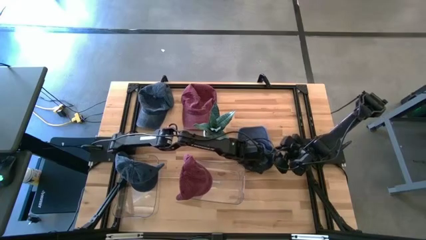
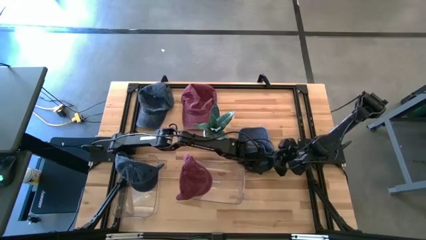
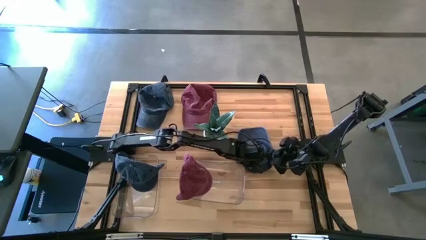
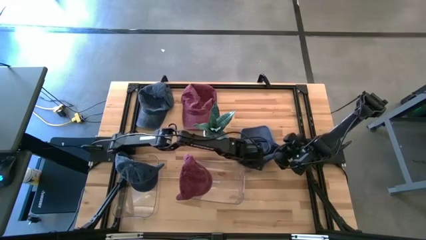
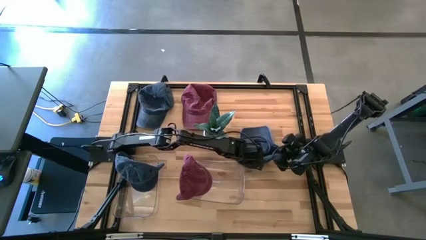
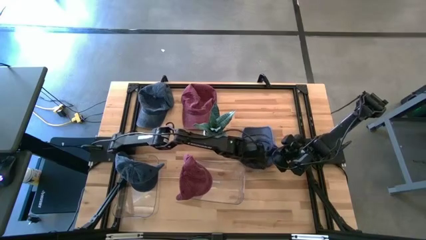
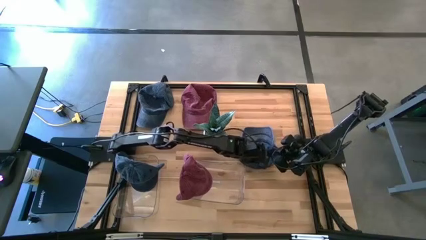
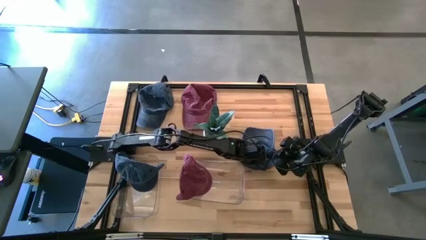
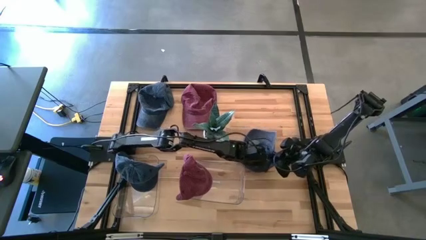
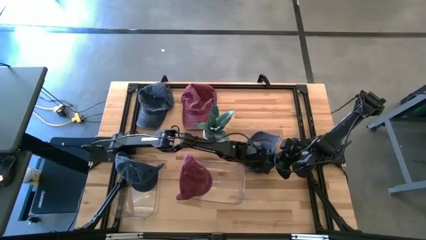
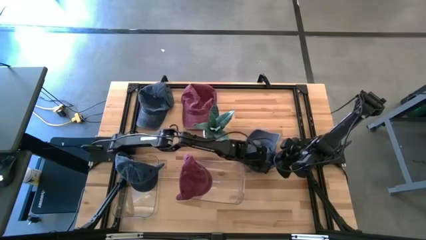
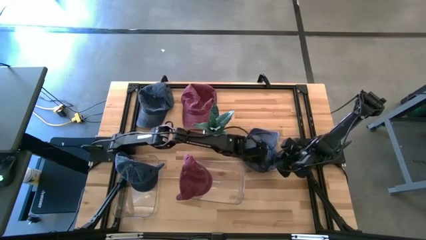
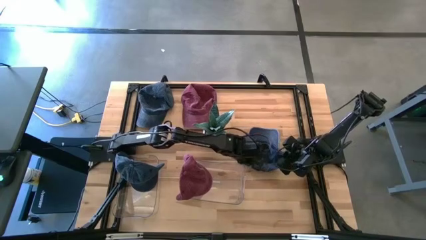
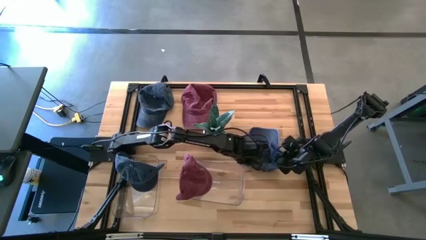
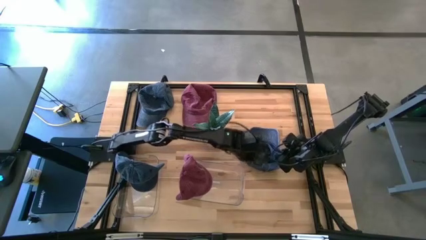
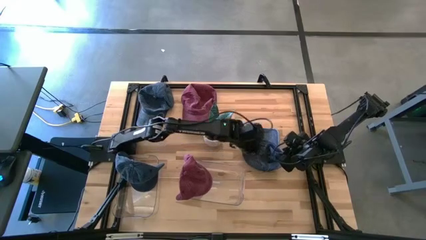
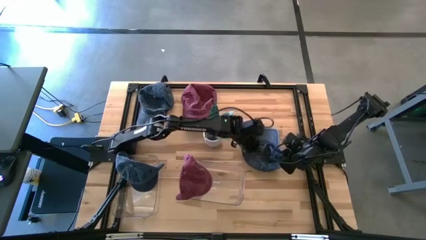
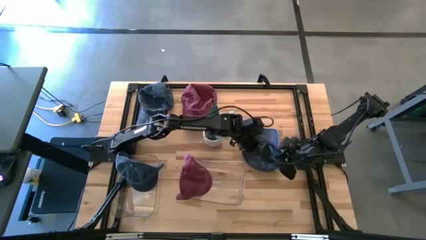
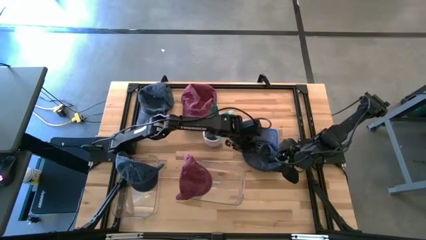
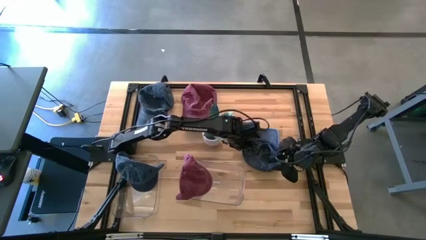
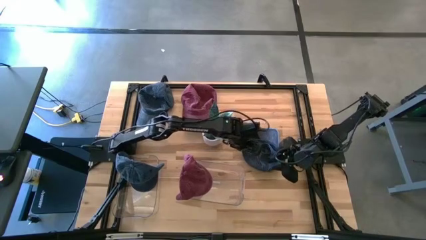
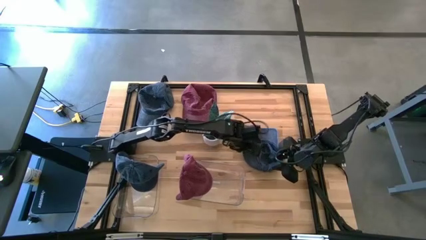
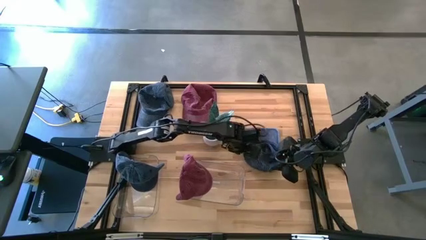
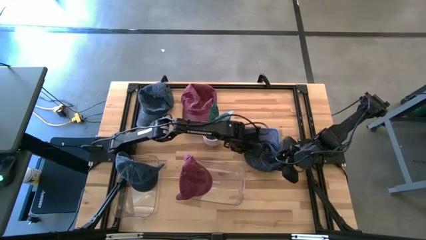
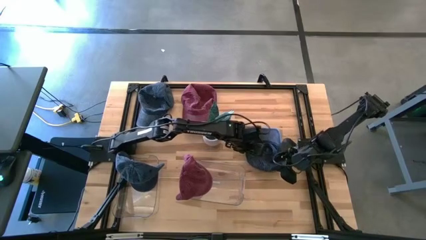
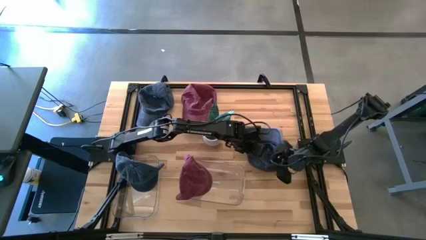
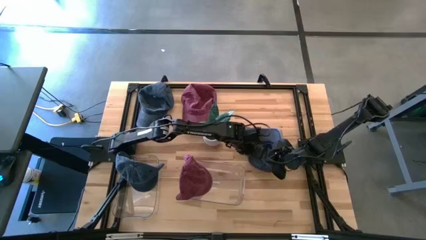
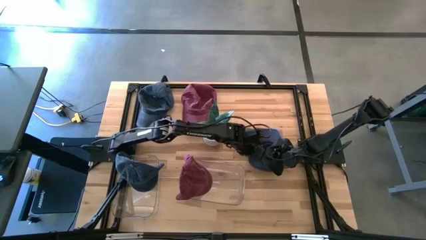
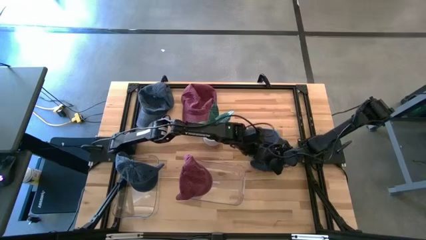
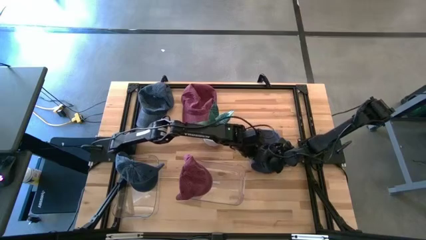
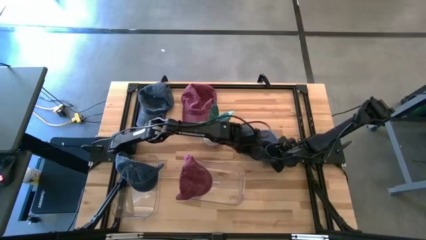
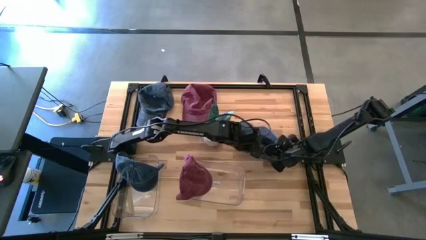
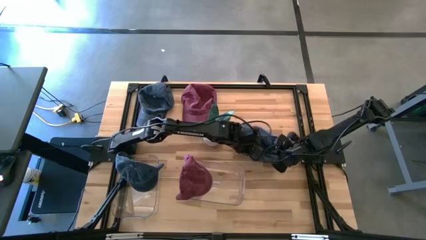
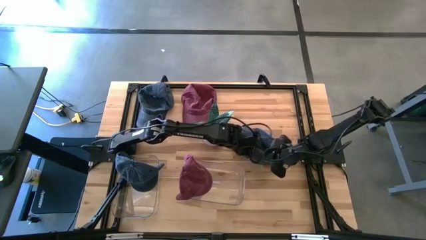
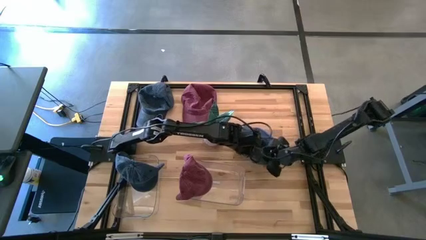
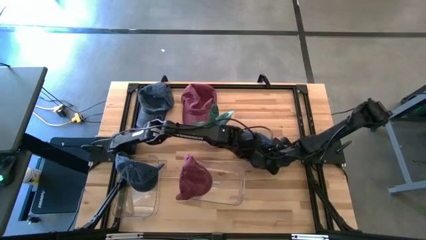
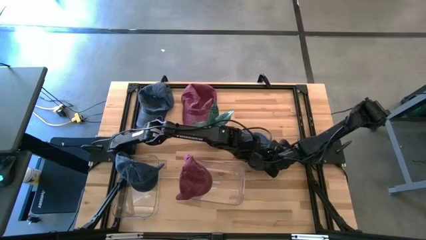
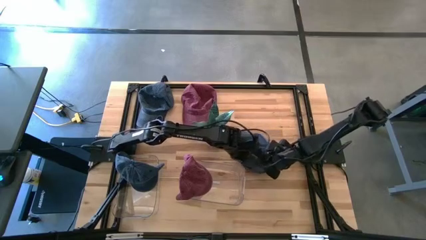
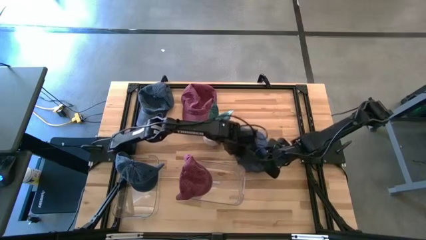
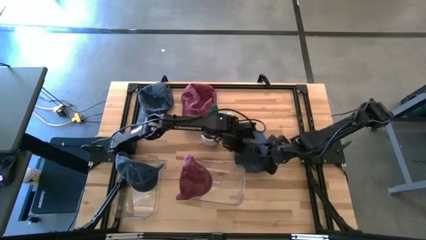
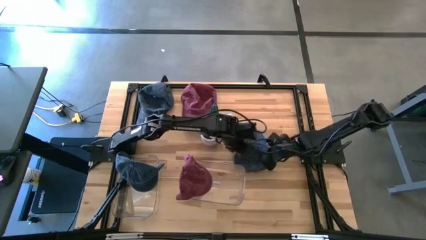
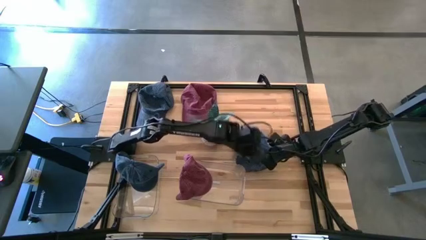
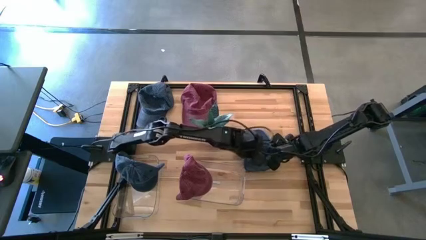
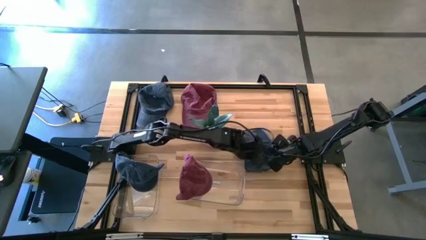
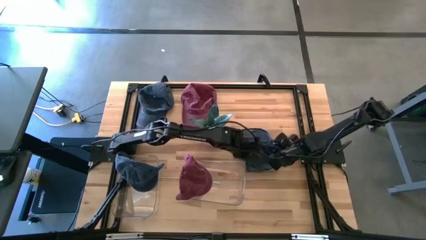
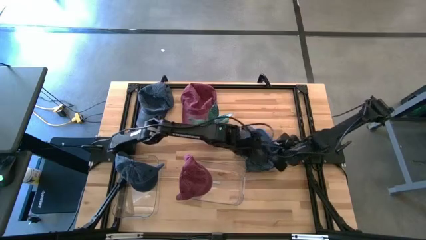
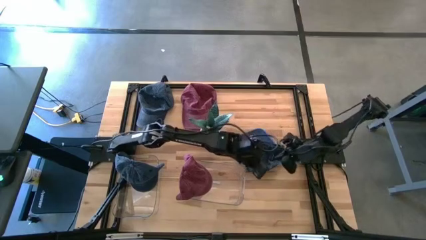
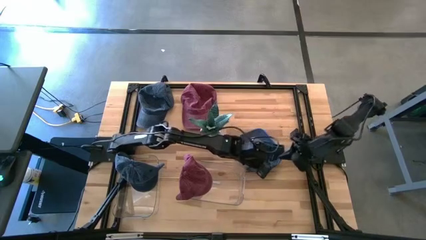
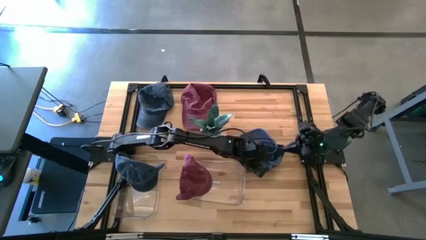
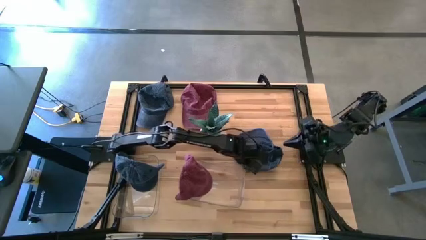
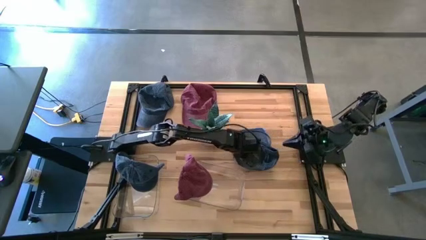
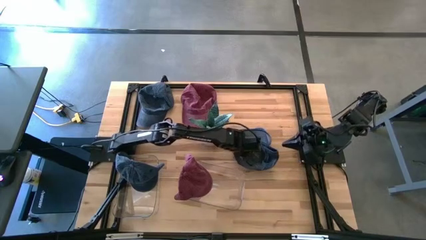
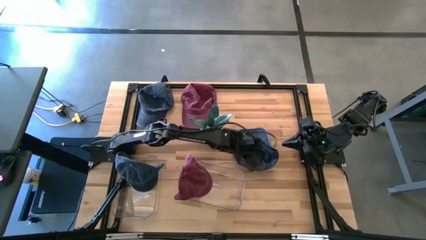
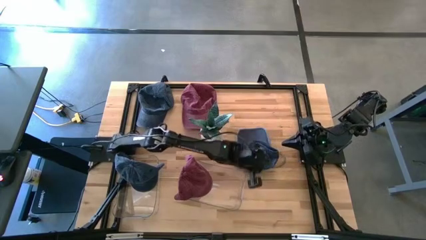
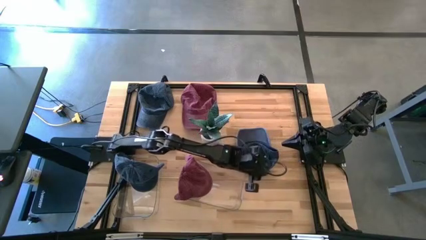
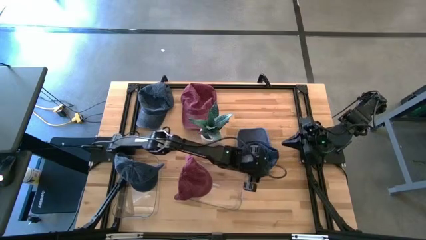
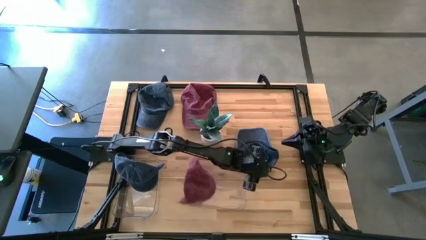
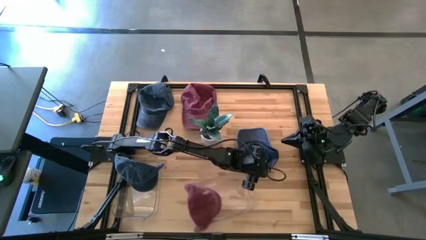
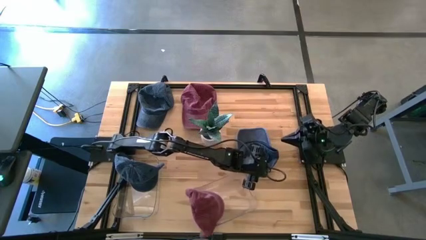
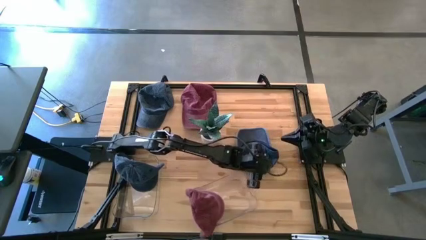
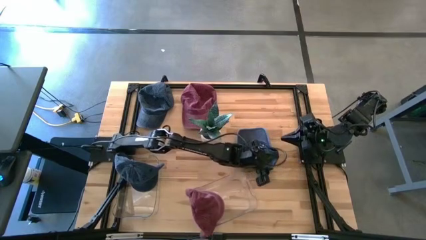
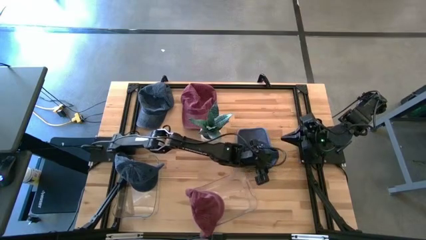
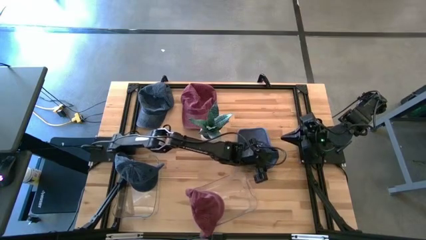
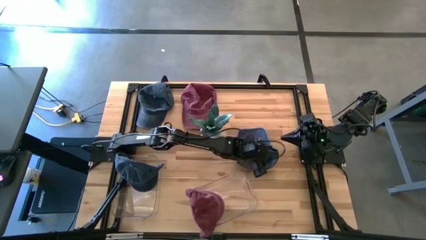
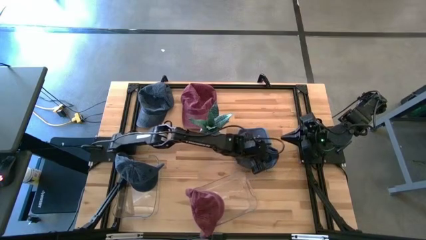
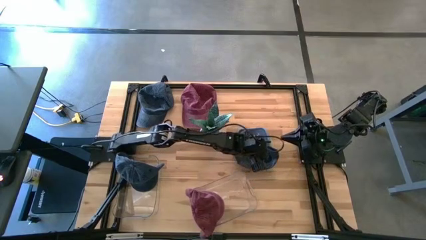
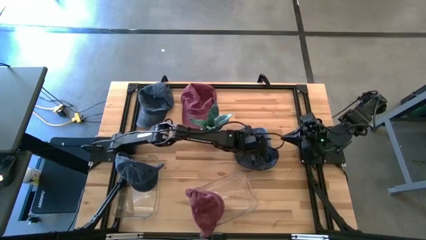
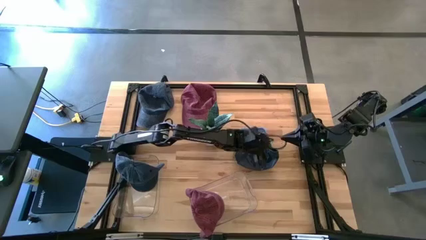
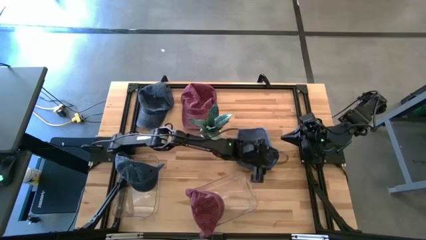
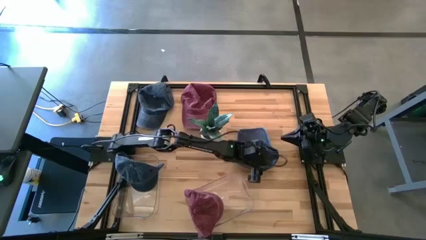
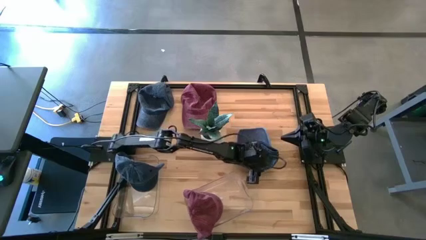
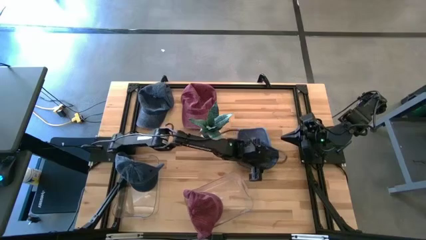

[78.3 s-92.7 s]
Task: Pick & Place hat
Put the right blue cap into the left transparent bin

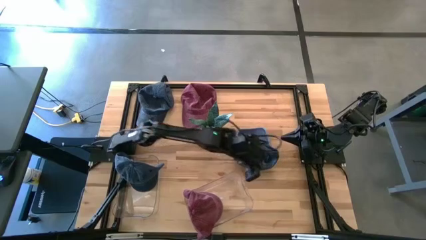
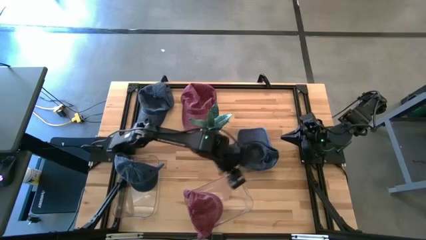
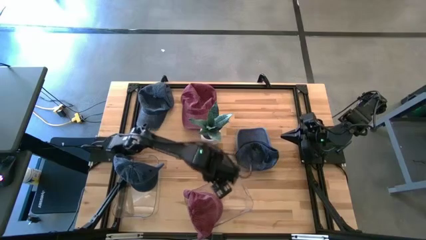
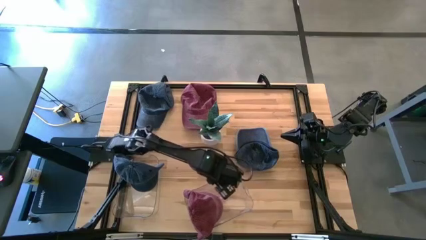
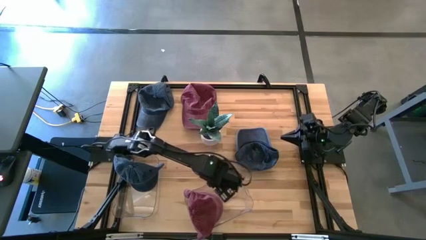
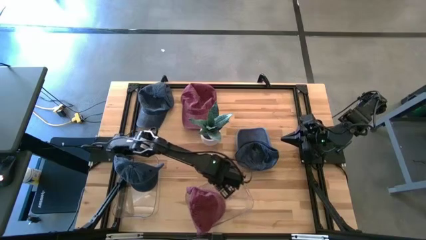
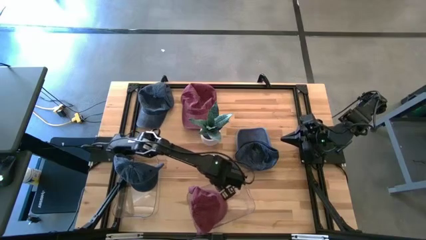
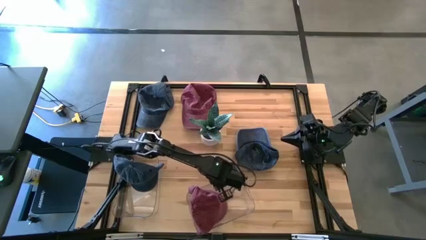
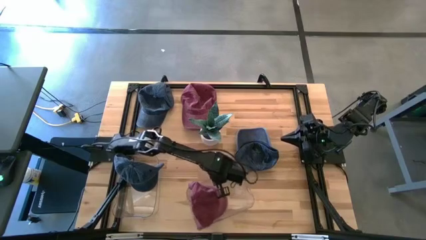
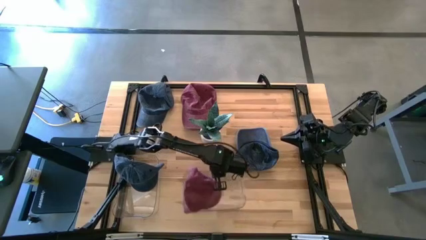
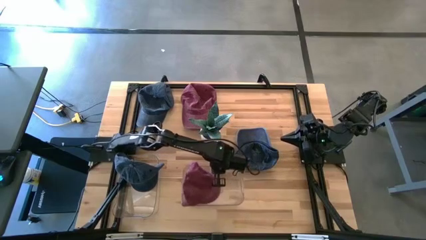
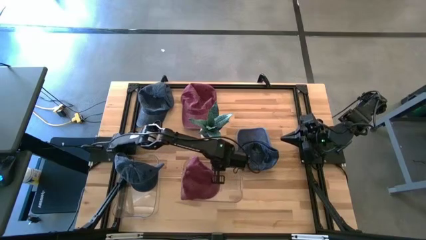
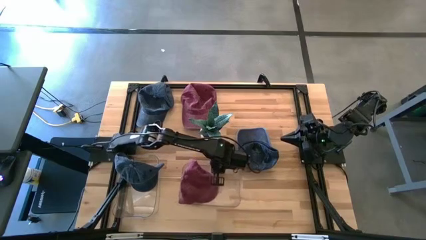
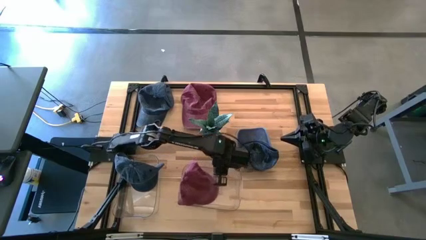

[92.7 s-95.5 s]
Adjust the right transparent bin
